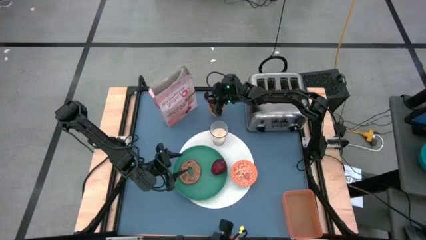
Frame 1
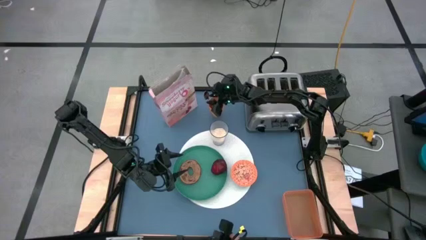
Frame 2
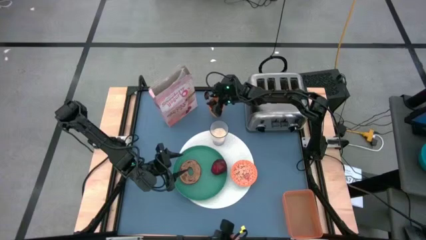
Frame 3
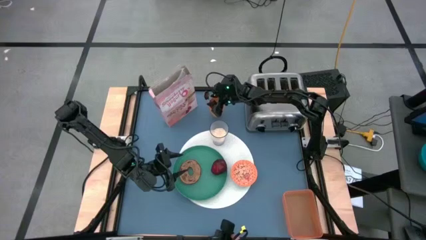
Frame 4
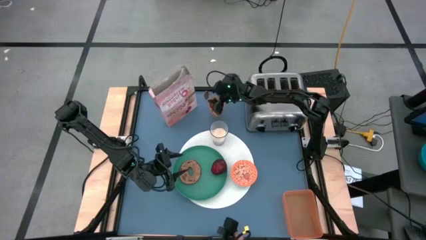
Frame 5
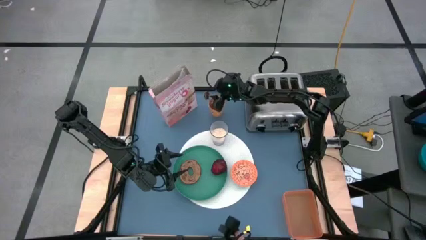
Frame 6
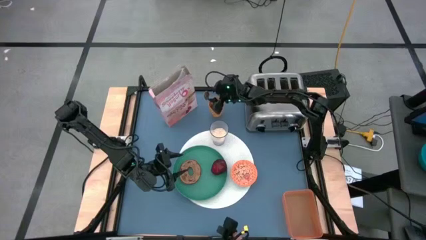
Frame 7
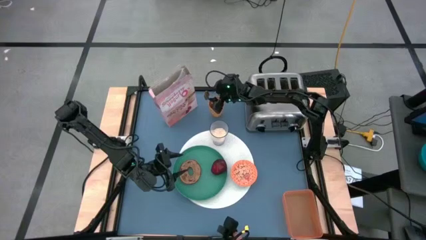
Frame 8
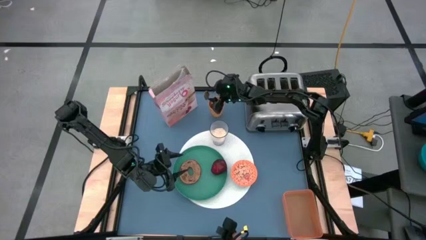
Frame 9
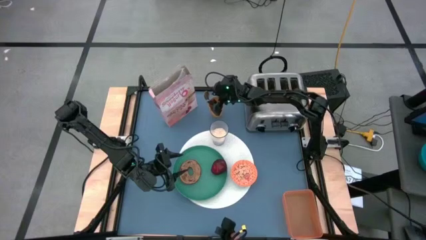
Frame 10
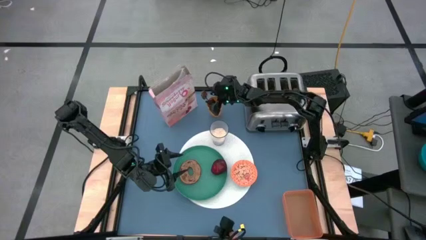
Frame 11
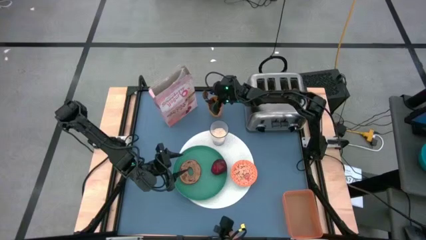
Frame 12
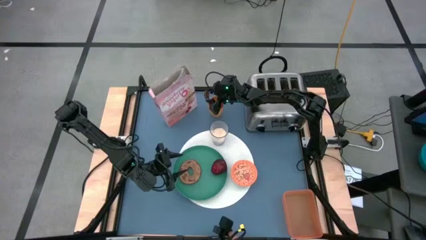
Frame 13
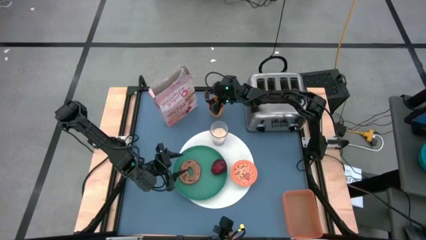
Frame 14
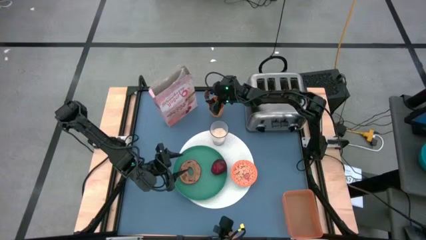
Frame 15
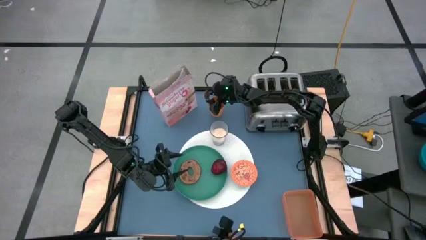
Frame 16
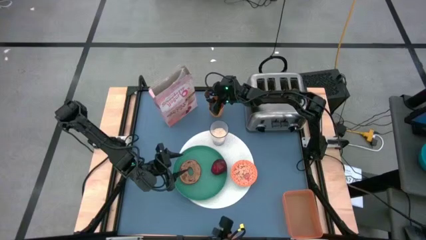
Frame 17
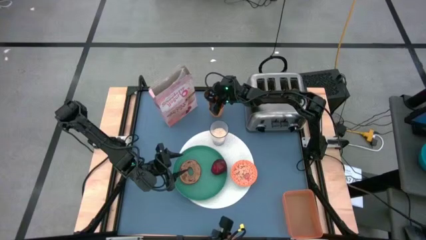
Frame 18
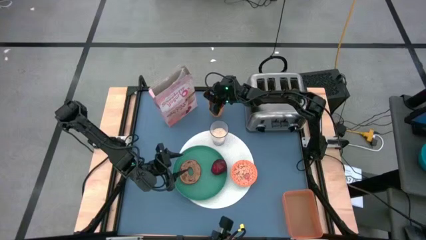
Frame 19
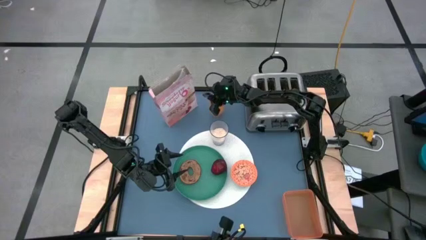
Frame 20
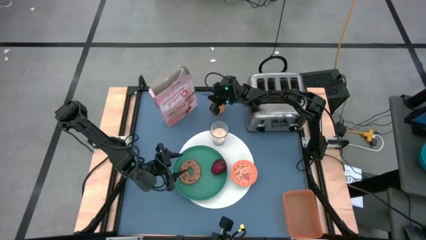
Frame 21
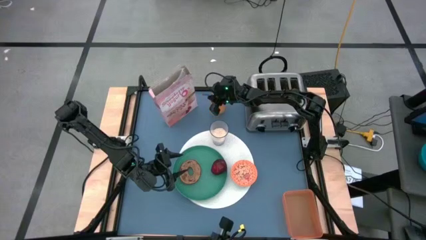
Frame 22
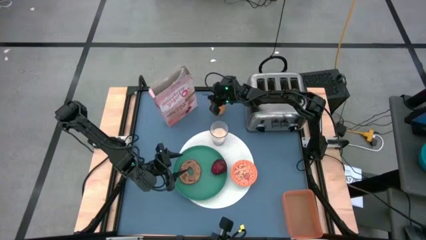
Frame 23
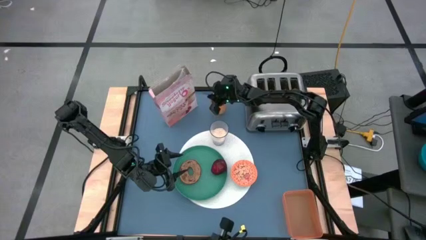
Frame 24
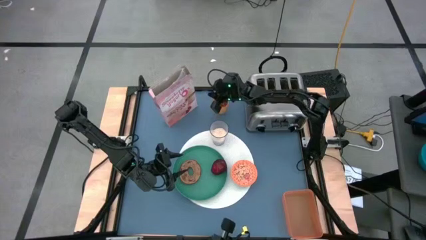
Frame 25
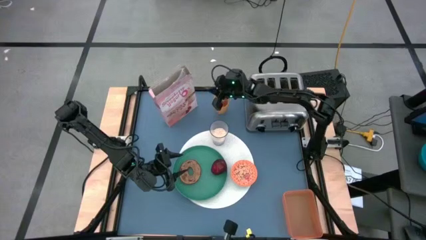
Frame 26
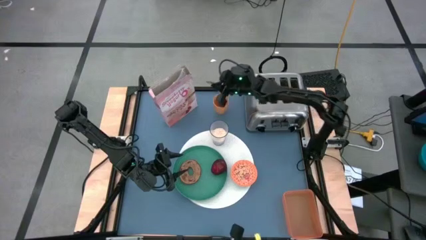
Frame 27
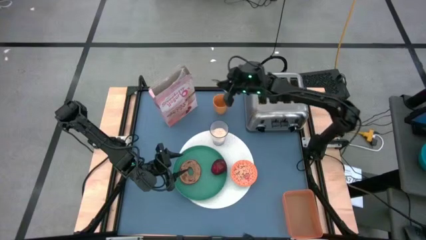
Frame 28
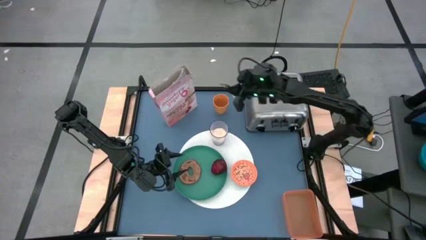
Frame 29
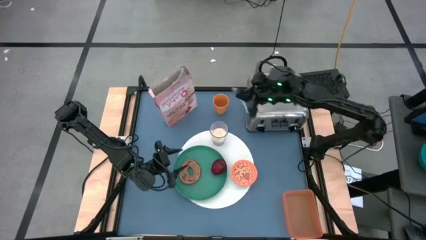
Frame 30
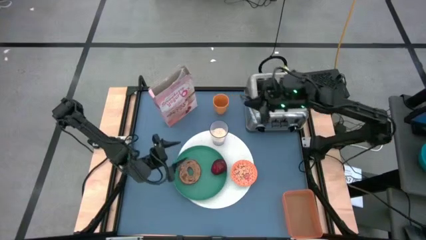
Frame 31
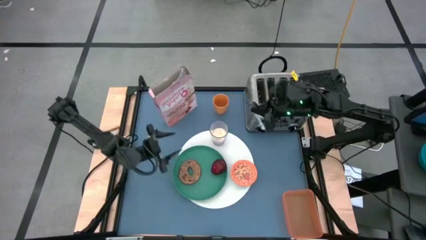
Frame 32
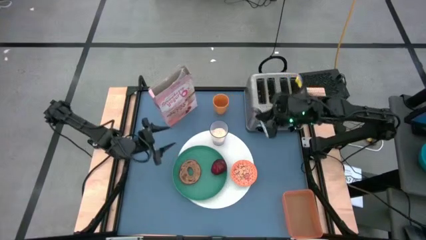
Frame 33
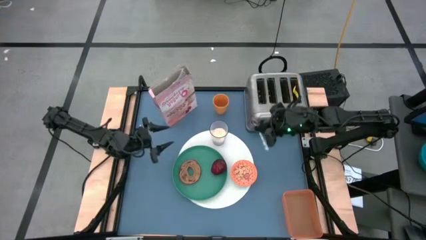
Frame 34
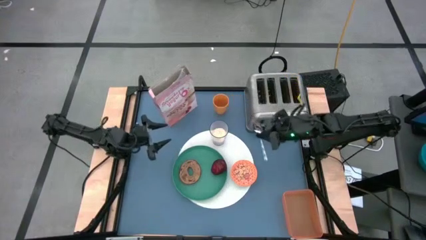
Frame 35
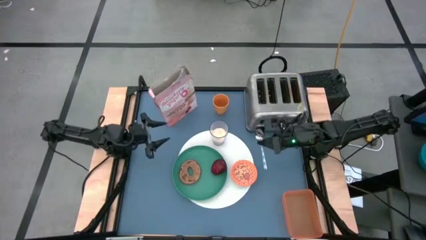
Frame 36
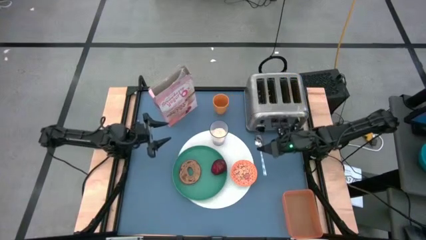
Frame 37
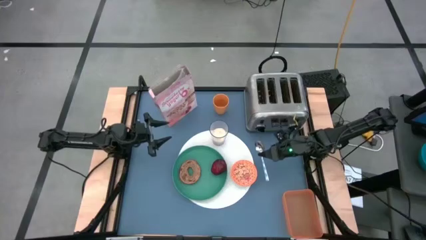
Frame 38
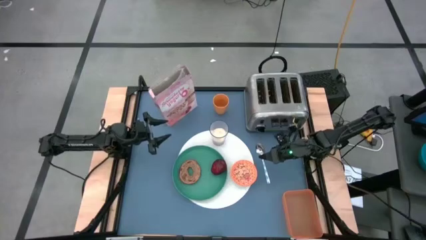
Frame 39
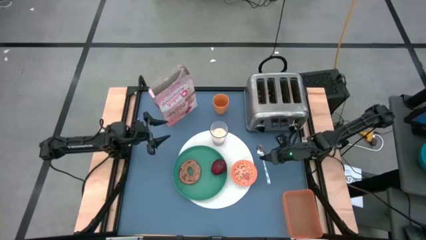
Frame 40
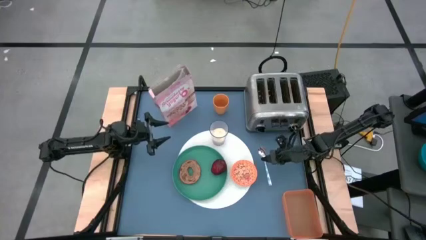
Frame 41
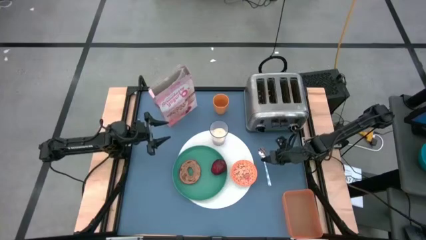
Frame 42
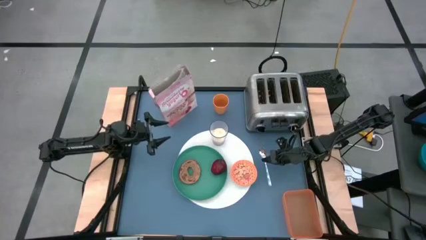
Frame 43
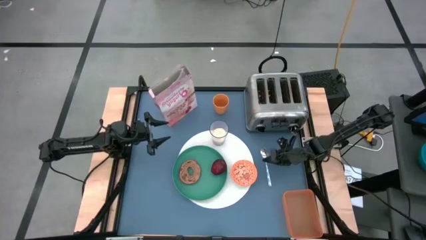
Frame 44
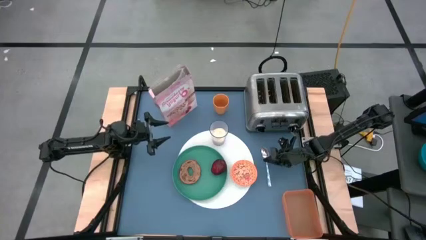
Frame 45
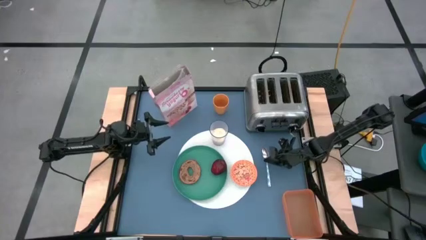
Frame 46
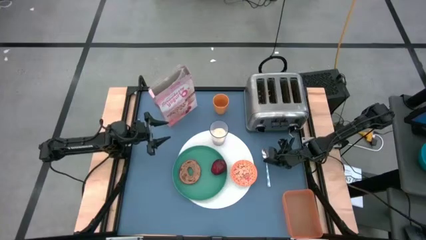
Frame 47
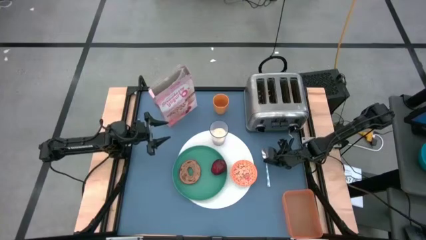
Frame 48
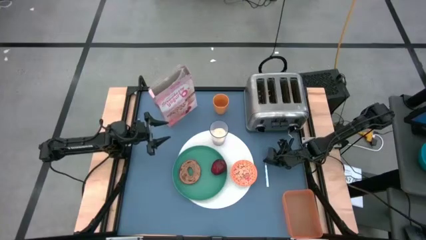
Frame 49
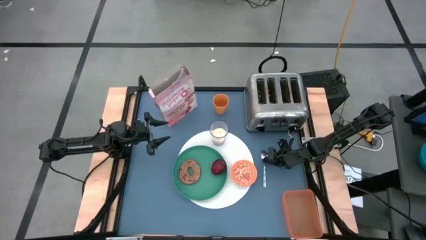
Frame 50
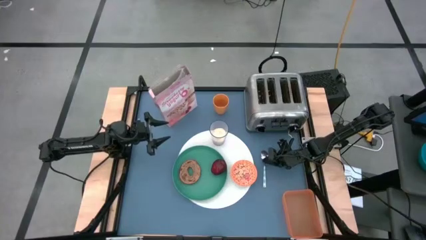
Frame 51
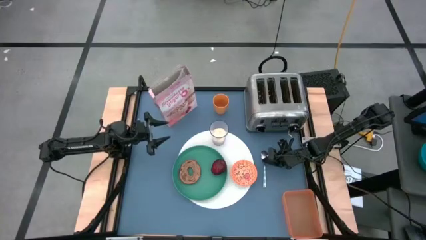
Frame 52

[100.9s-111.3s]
Task: Arrange a breakfast setting
Put the spoon beside the orange bowl

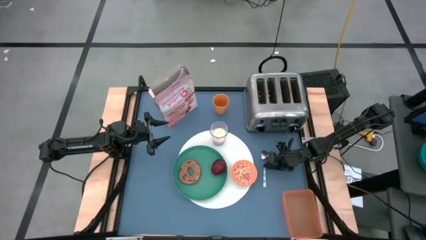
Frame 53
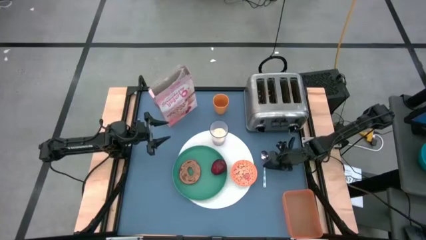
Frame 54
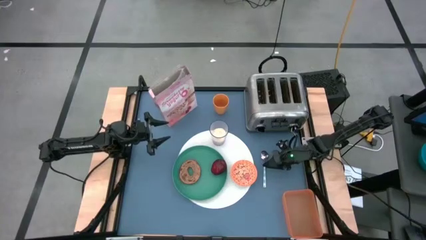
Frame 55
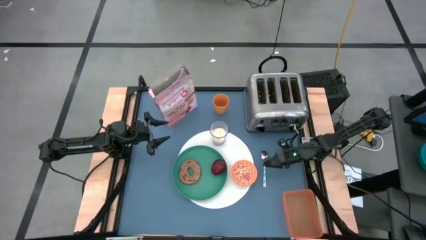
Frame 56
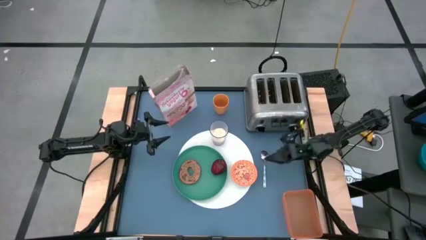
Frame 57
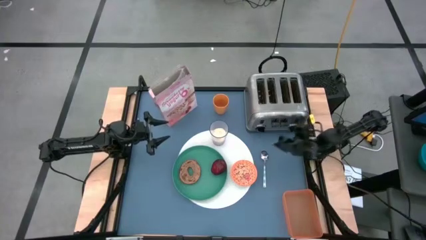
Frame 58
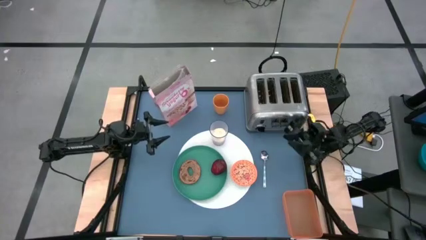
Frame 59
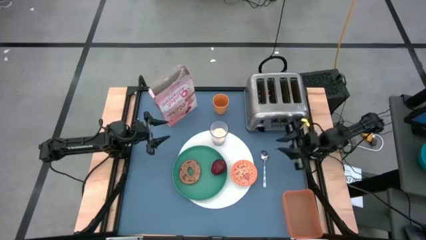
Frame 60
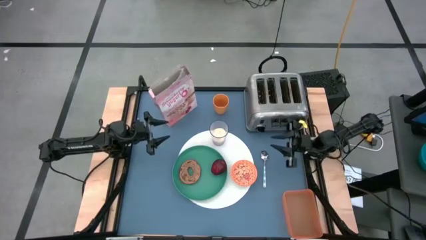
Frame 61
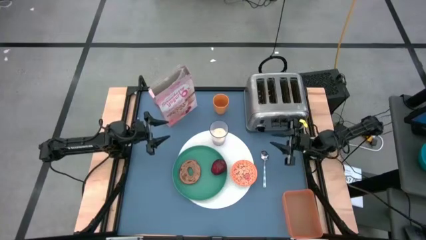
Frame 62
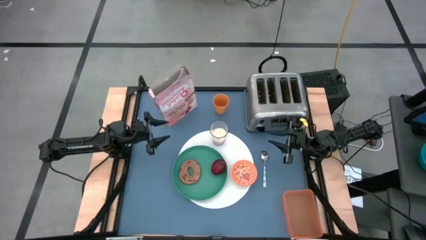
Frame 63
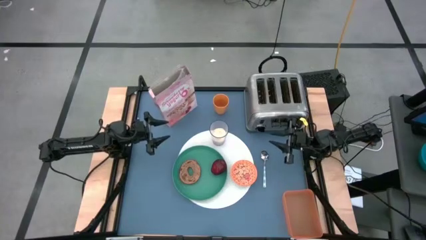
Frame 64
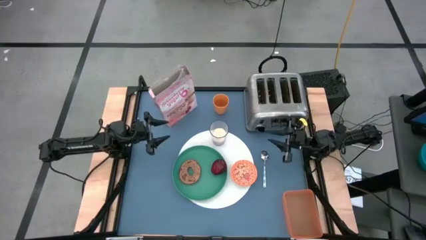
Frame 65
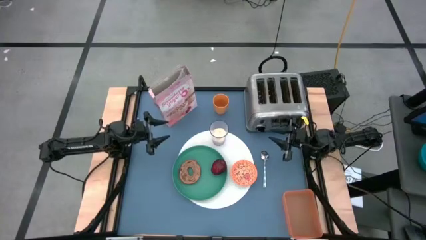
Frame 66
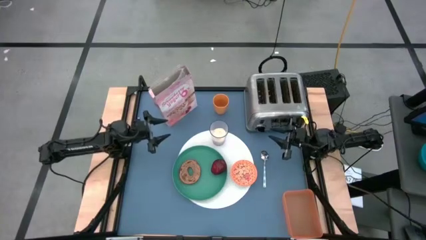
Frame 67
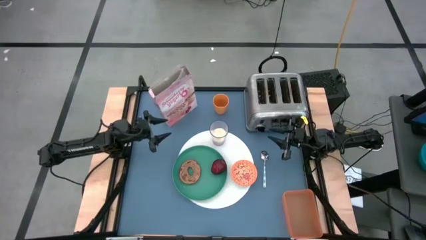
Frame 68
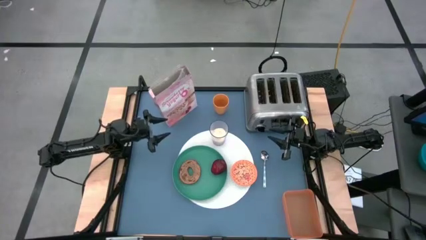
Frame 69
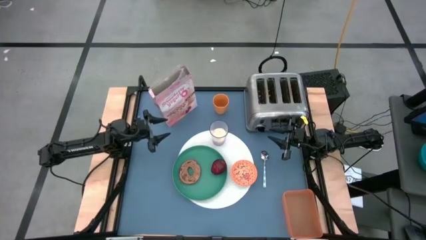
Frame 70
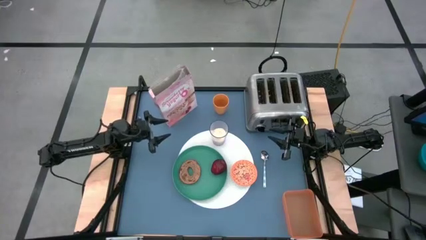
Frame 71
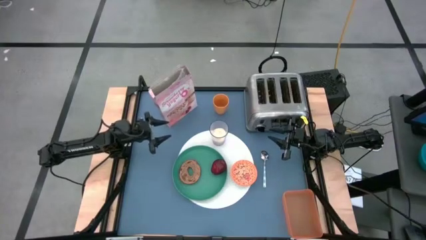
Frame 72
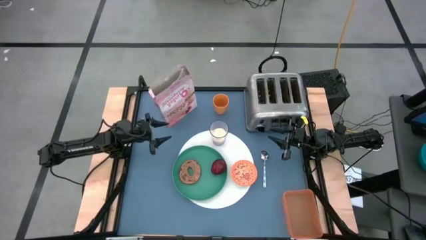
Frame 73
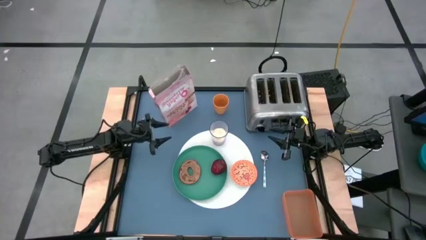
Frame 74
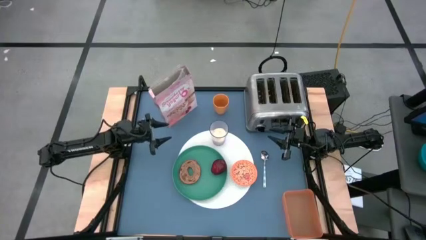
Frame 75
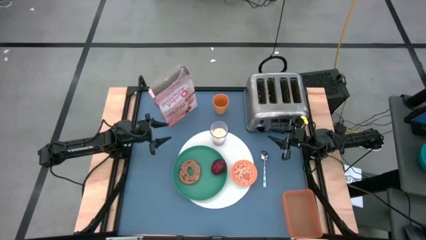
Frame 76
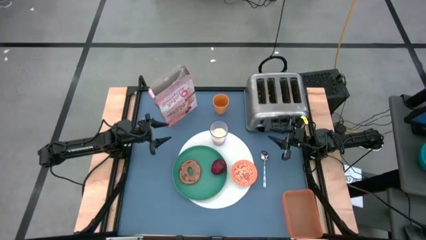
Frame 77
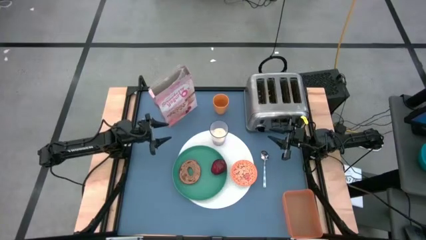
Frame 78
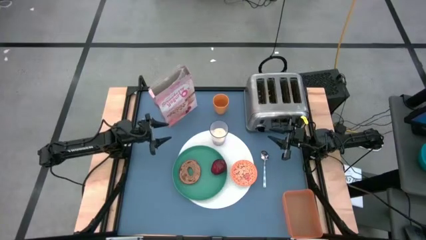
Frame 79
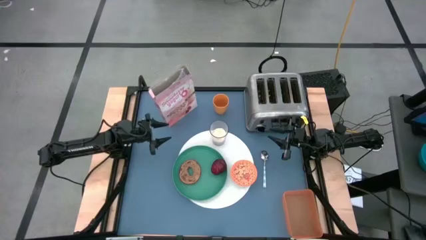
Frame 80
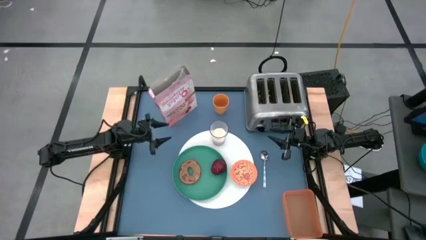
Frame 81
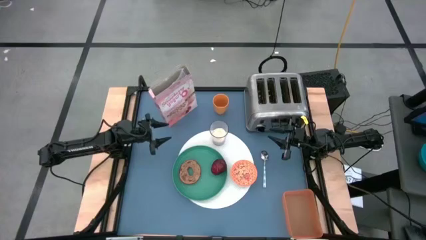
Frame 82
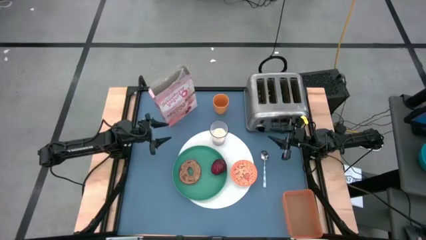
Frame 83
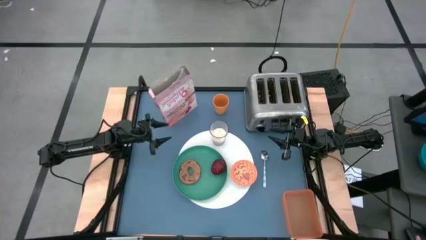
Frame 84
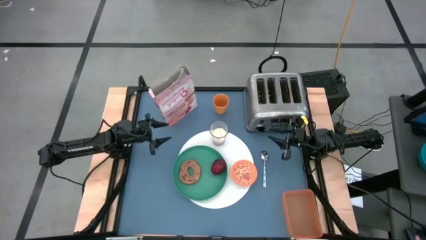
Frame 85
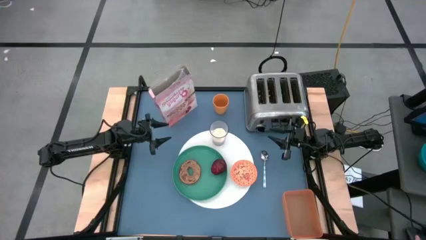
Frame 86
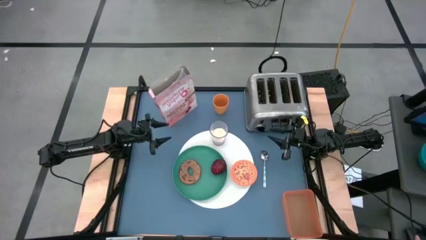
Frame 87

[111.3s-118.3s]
Return to Home Position
